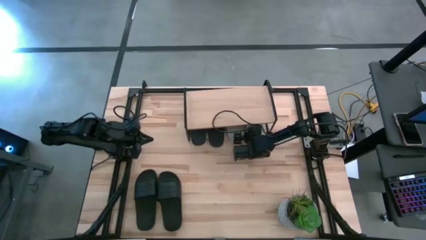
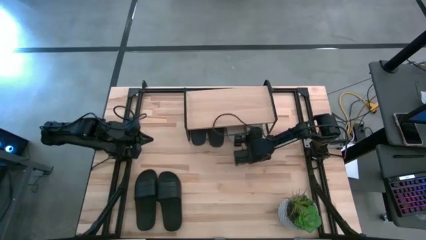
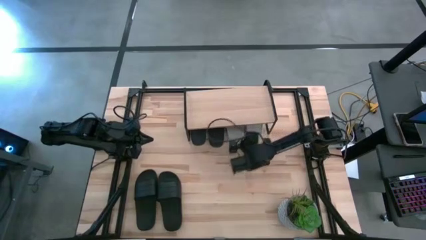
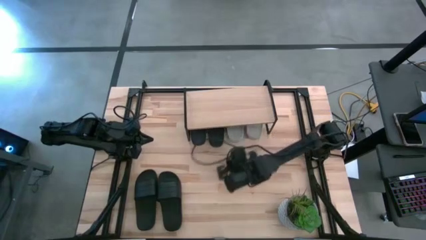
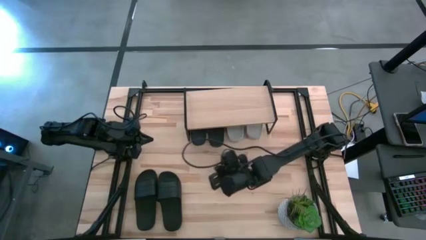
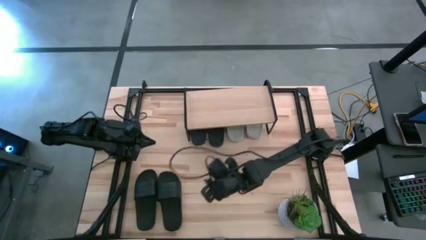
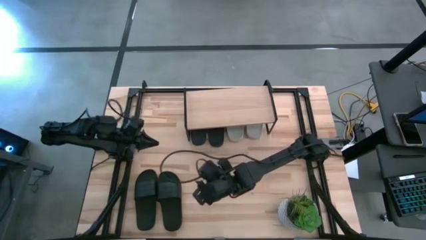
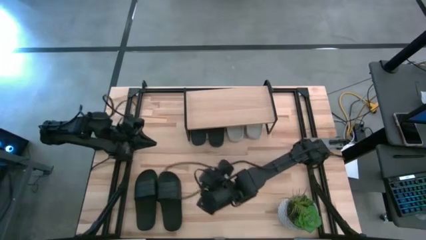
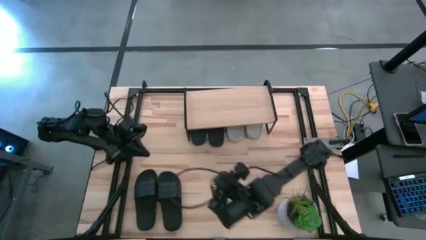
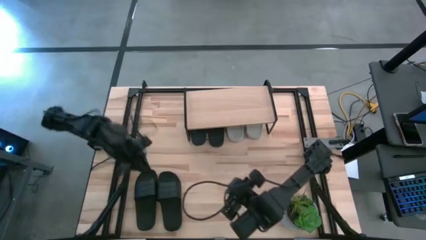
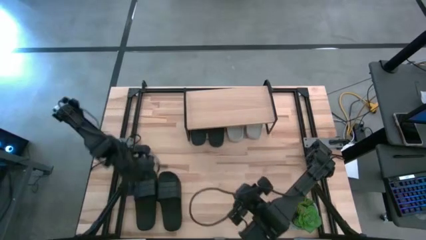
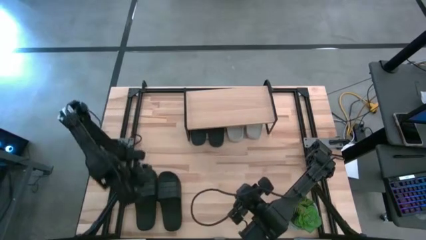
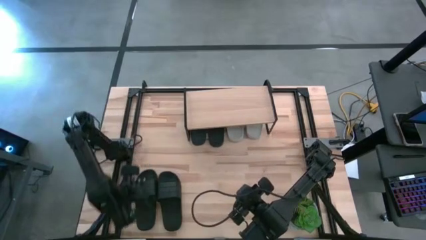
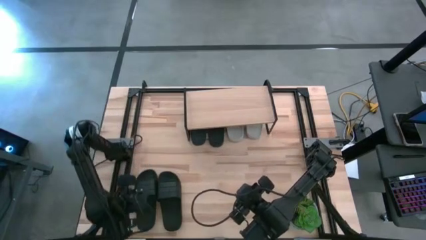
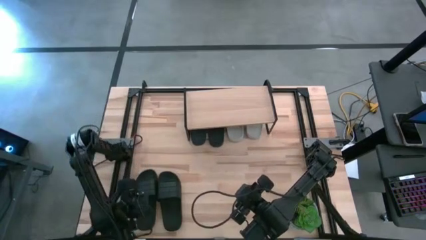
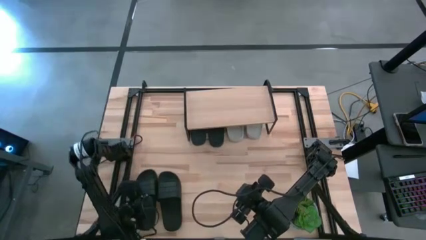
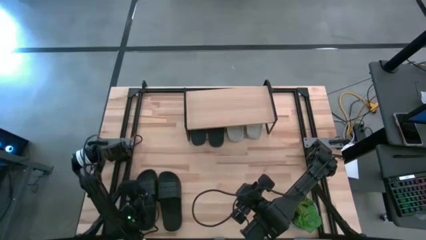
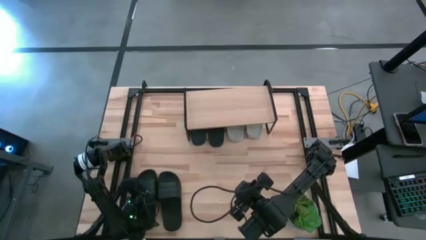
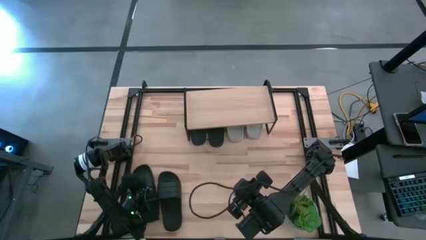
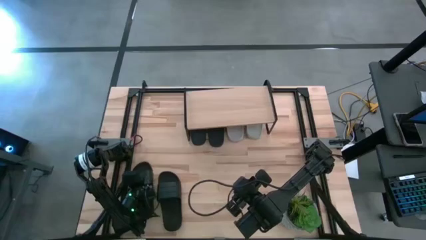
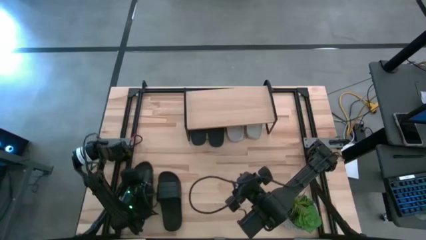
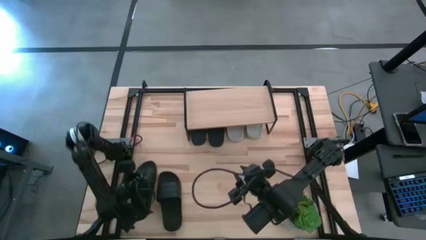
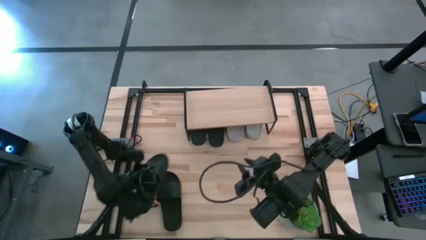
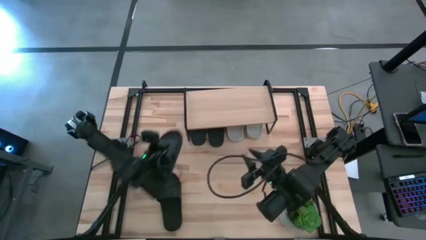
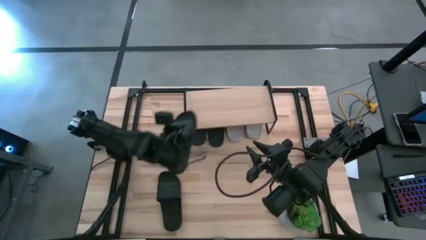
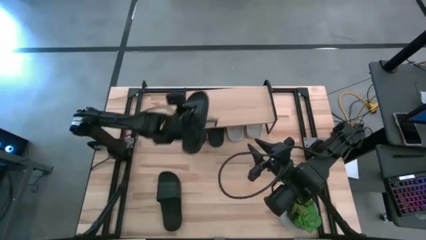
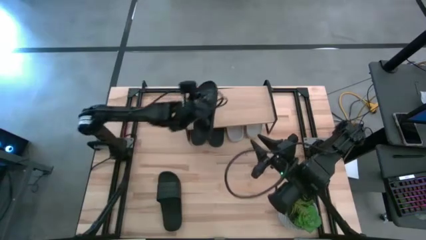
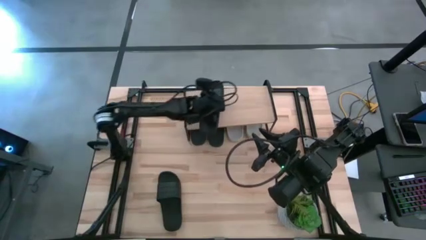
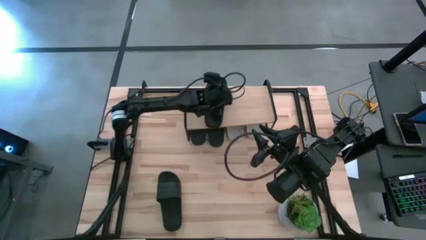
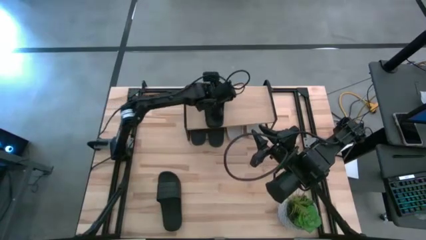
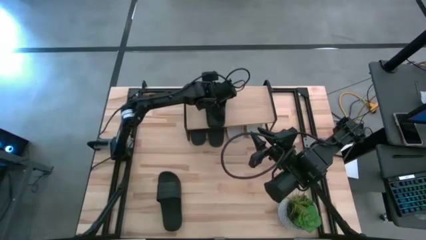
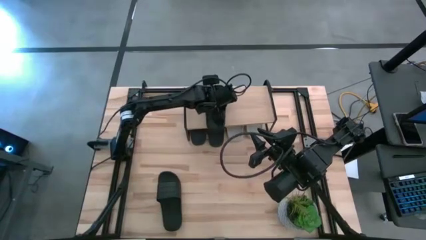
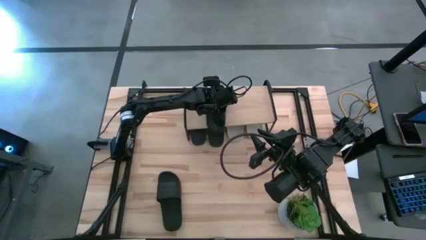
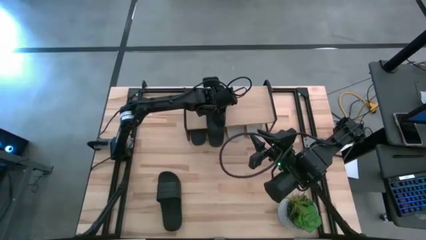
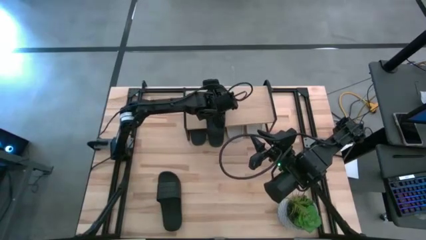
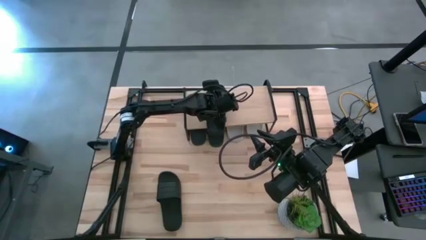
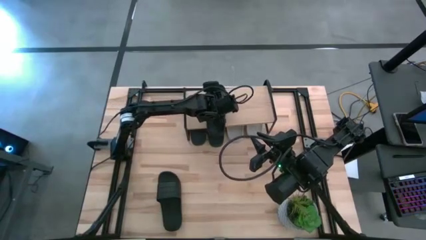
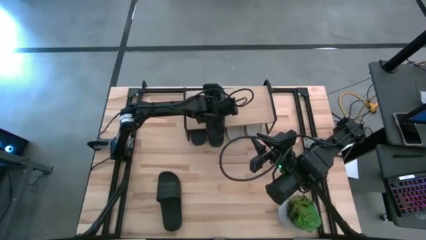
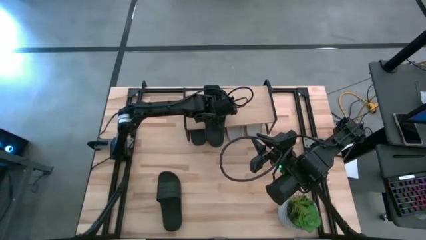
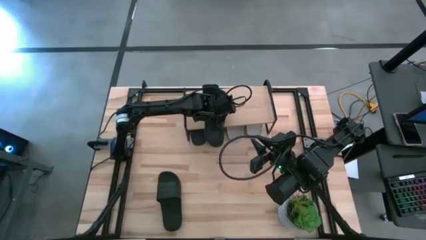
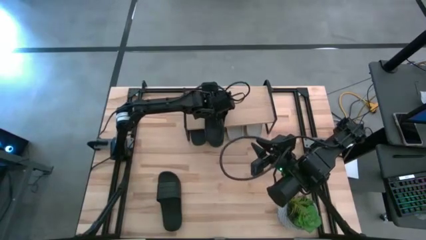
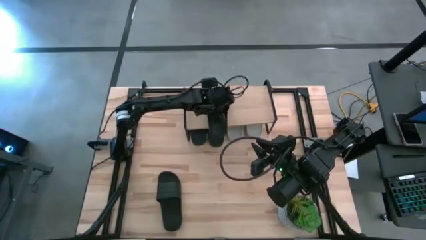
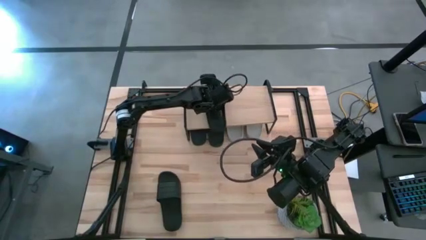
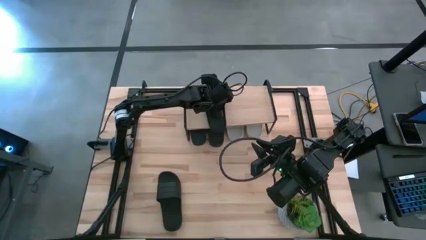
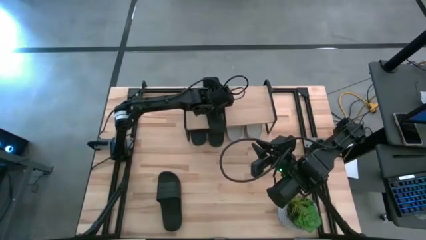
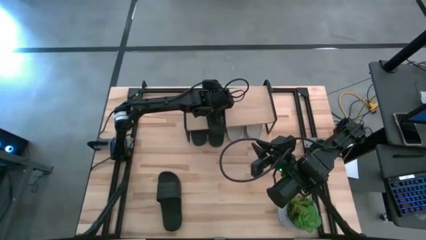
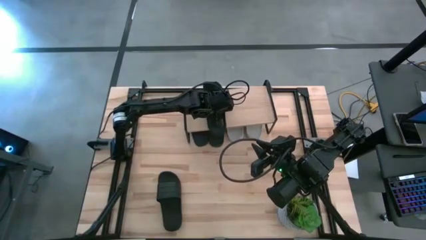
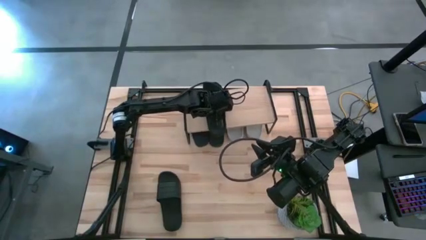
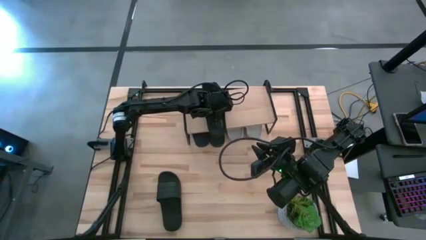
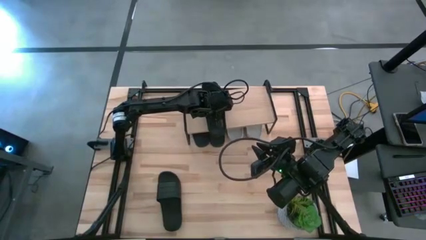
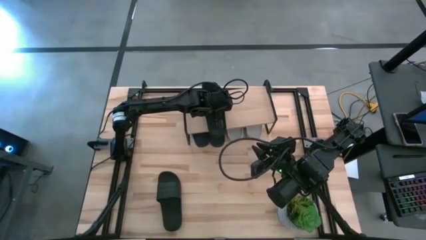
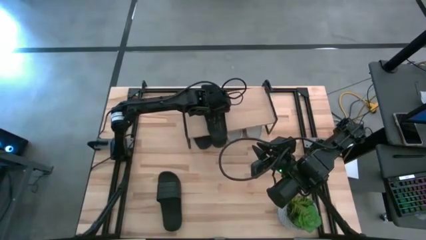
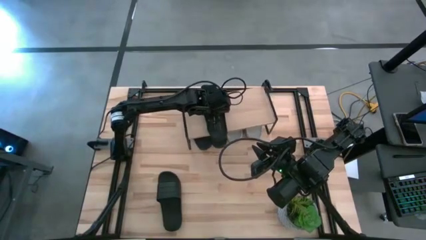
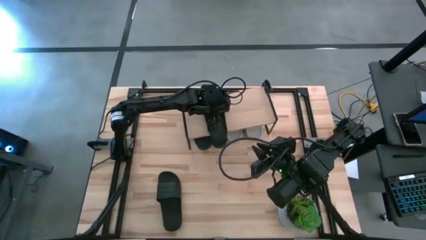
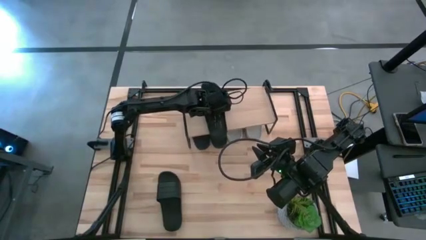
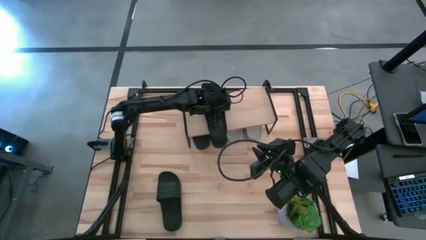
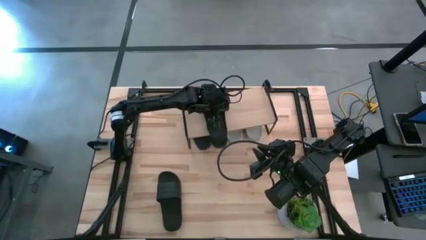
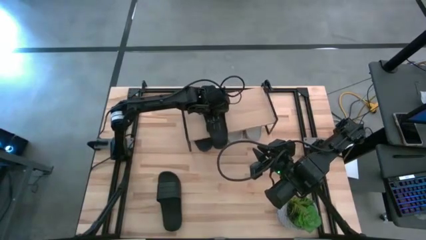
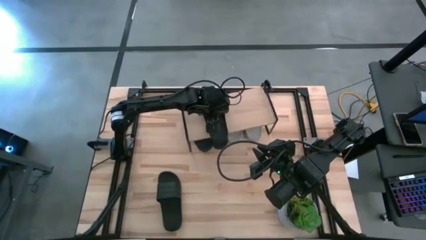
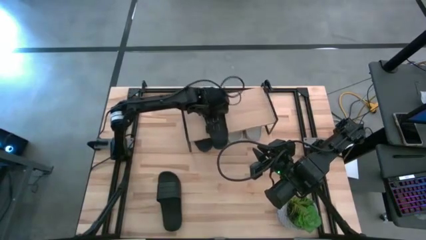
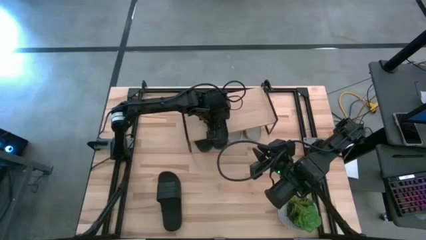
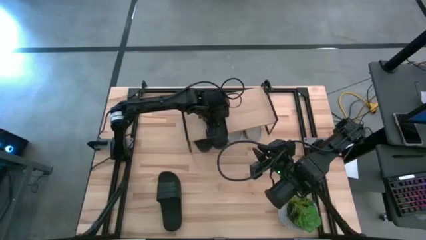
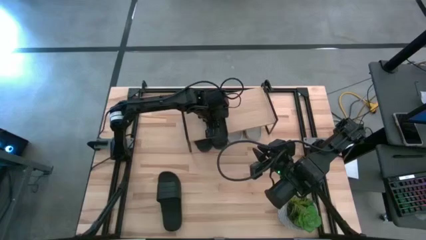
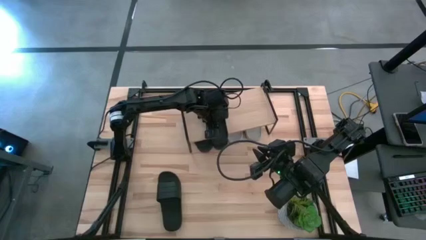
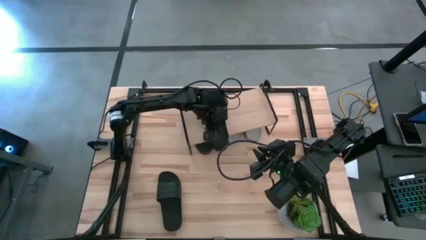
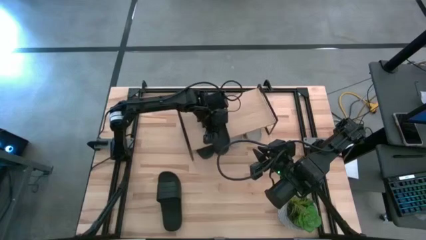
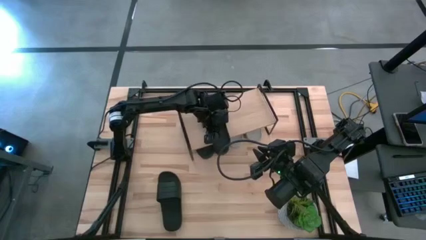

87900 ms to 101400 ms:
Task: Pick and place slides into the shelf
Put the black slide on the shelf

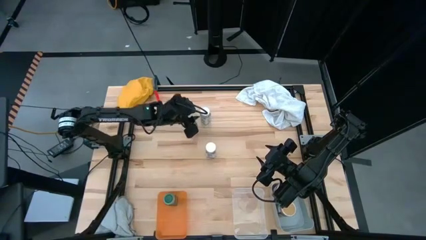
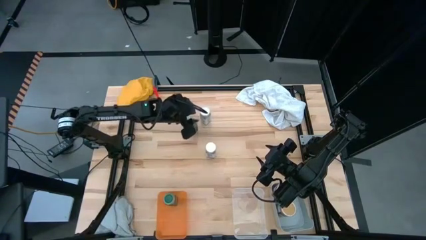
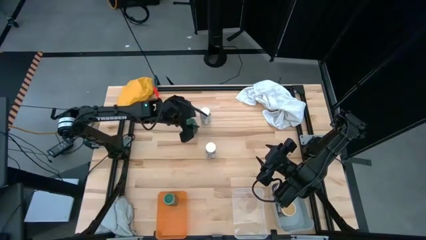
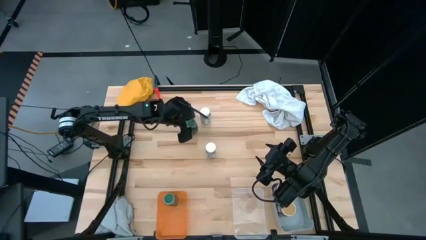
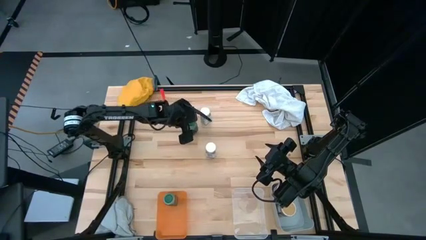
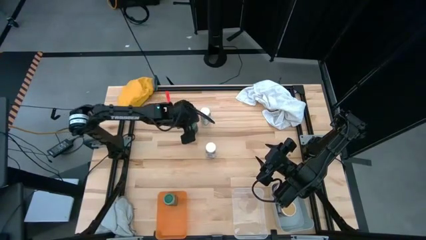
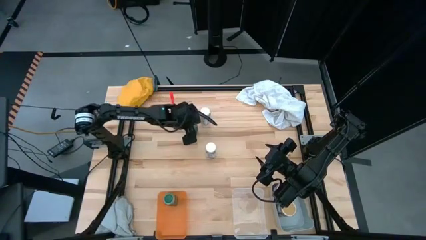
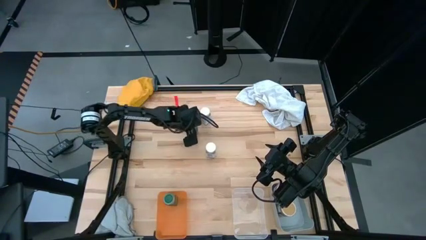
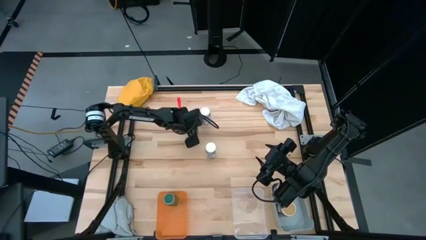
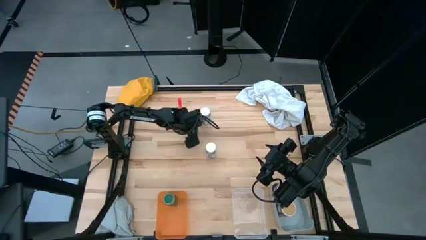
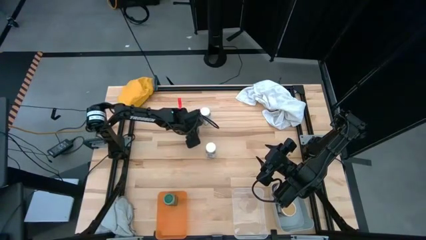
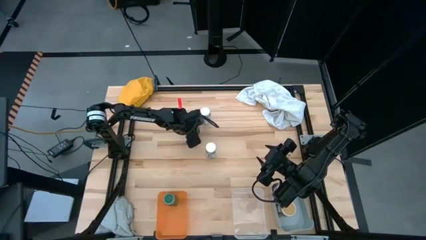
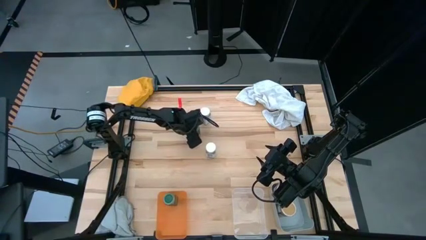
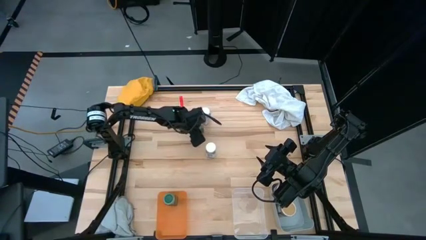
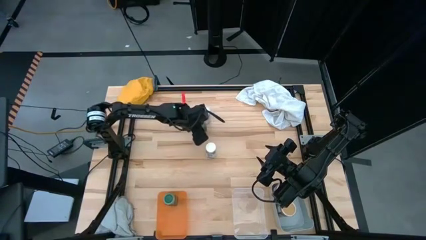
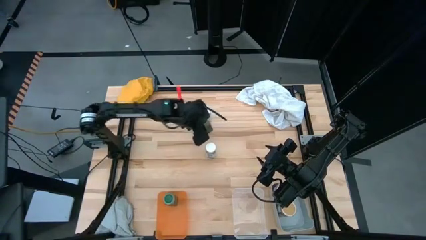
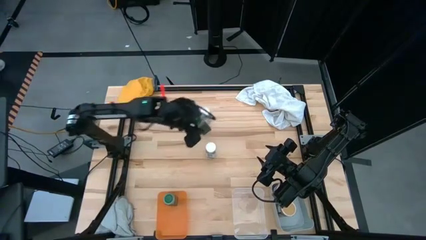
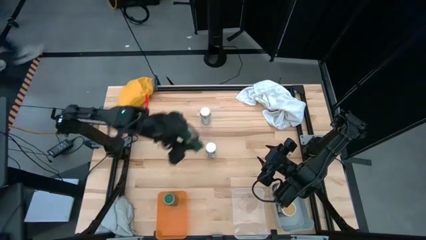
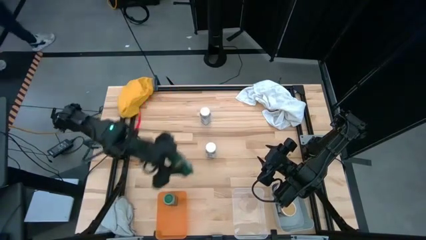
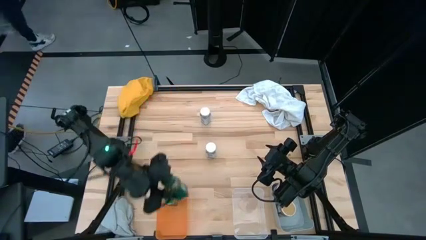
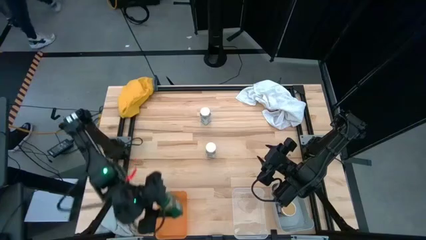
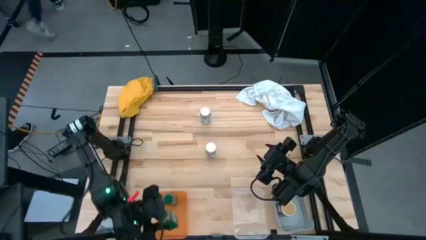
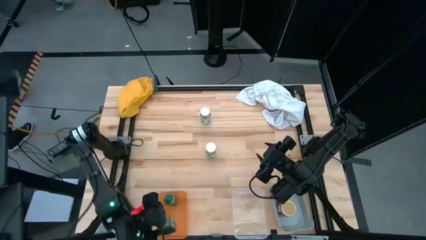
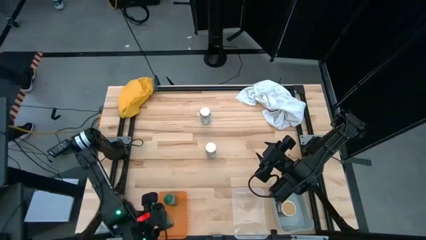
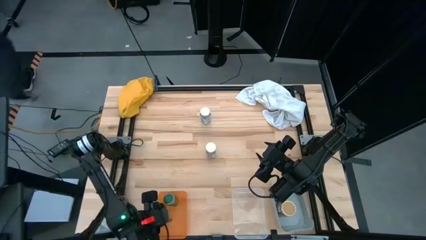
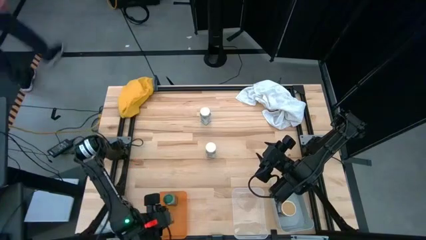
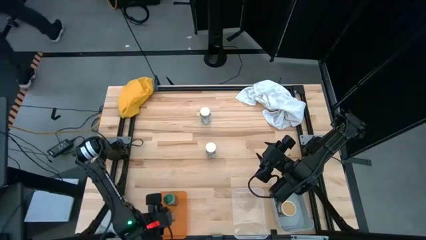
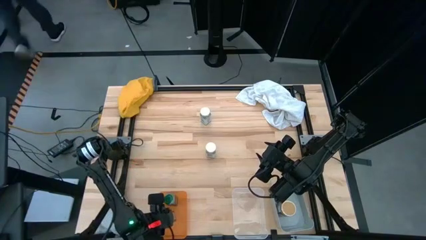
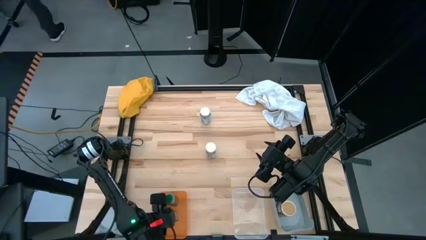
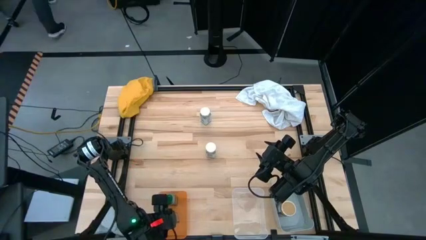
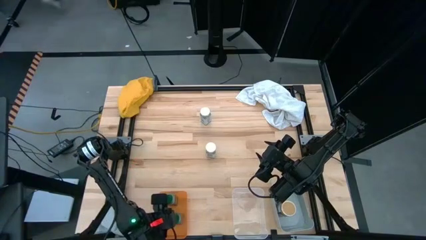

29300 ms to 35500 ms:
Task: Sort spices by type
Put the green spice bottle into the orange bin
